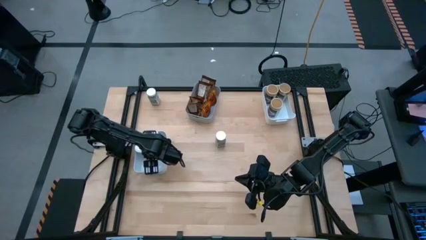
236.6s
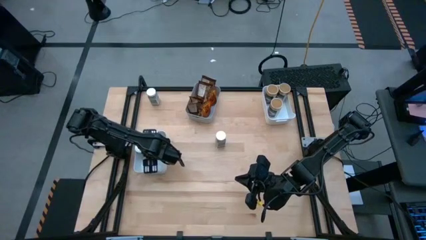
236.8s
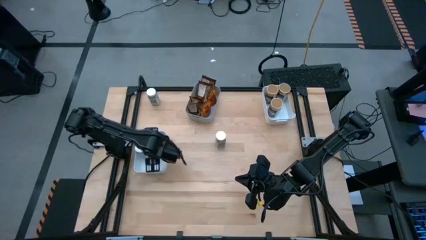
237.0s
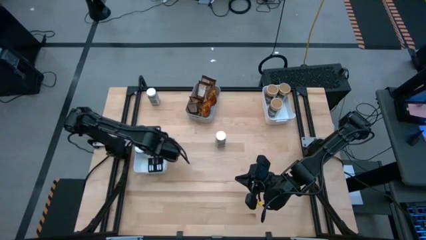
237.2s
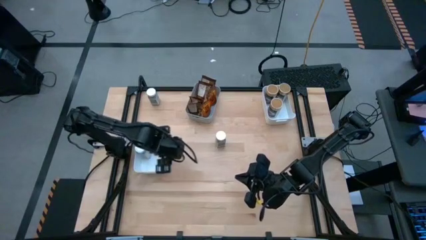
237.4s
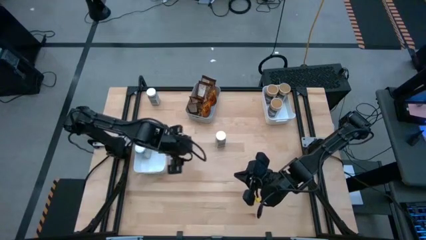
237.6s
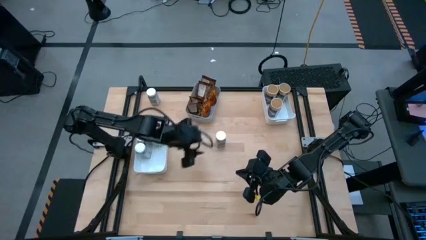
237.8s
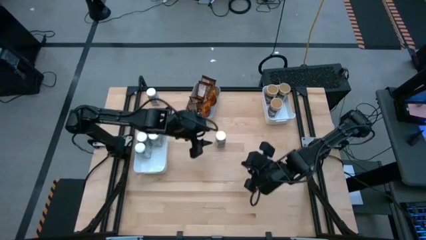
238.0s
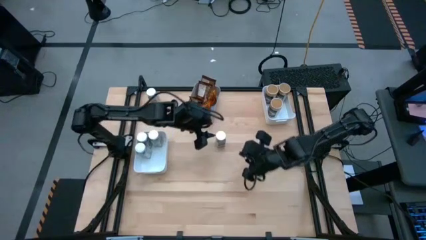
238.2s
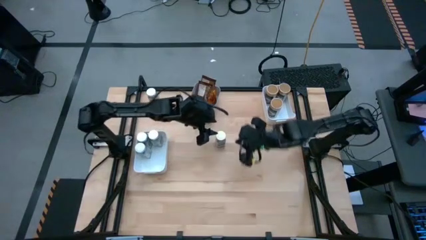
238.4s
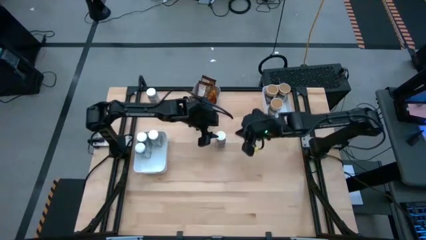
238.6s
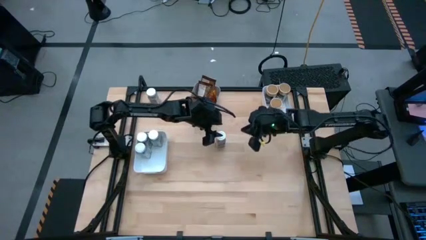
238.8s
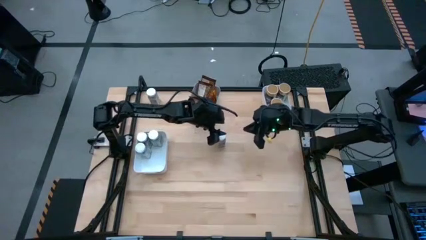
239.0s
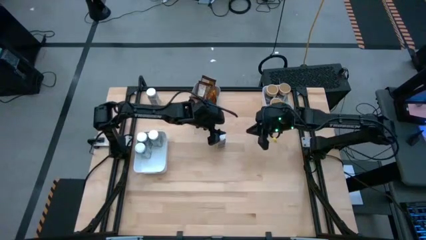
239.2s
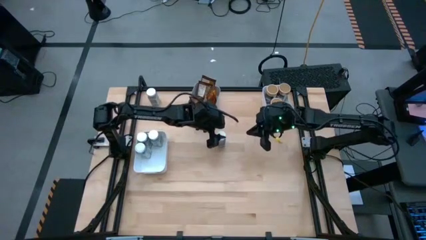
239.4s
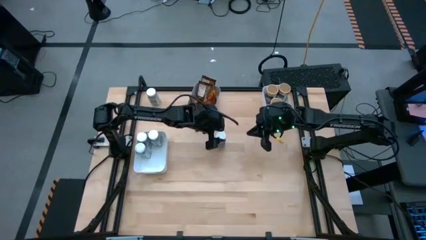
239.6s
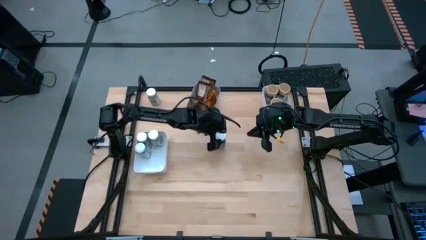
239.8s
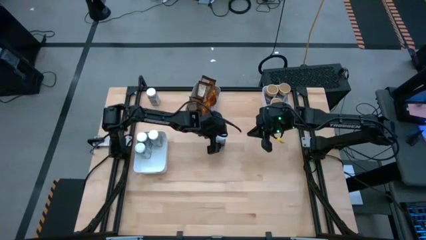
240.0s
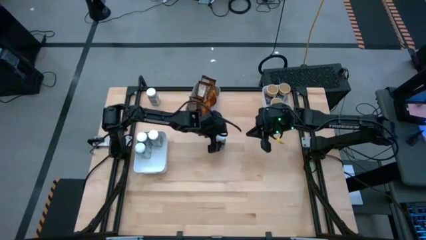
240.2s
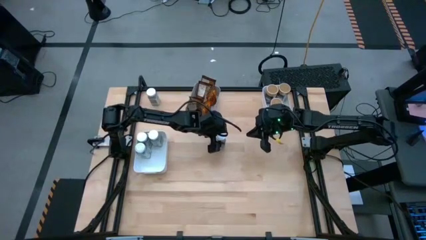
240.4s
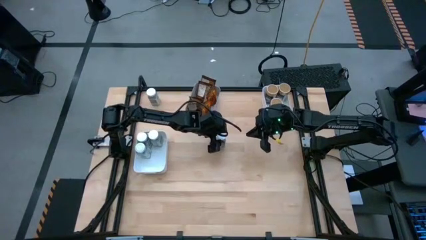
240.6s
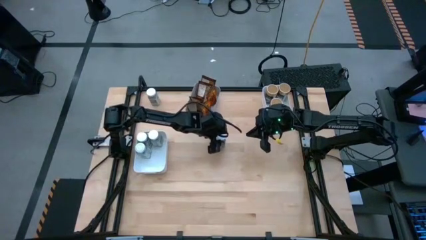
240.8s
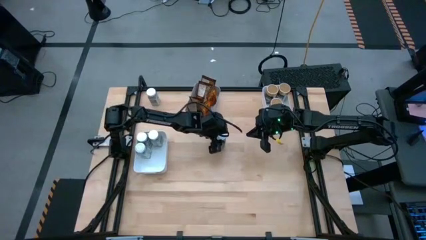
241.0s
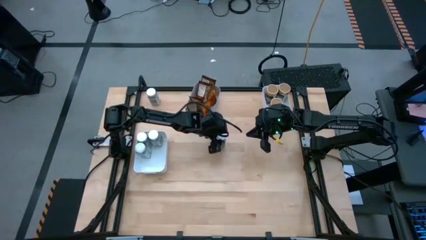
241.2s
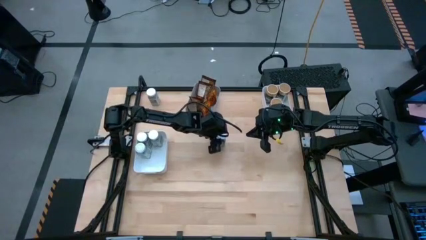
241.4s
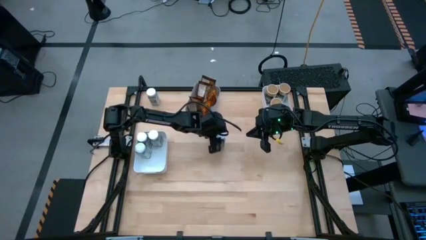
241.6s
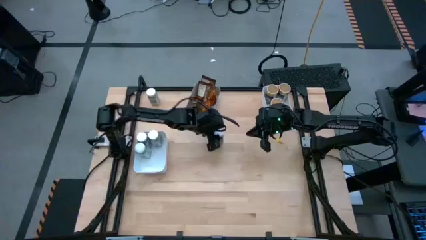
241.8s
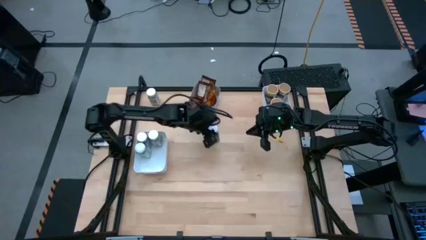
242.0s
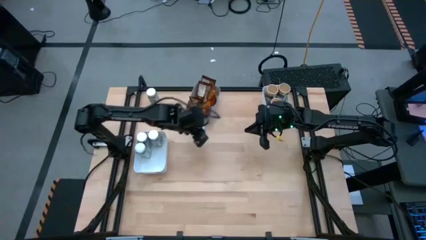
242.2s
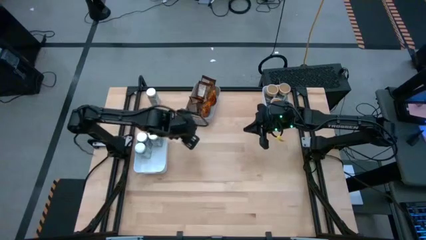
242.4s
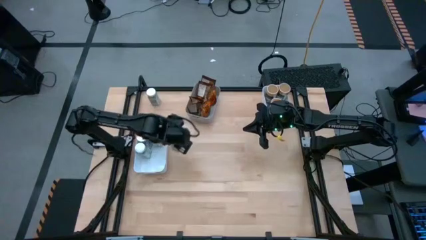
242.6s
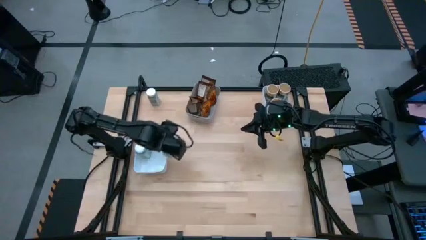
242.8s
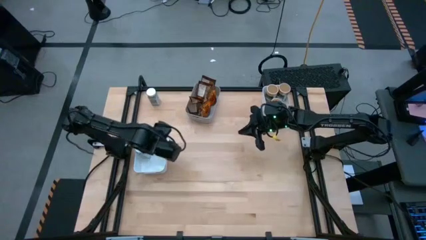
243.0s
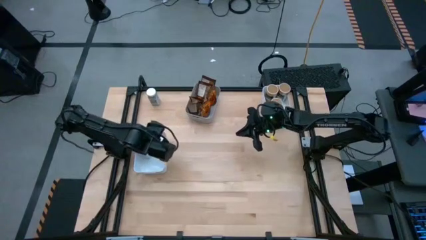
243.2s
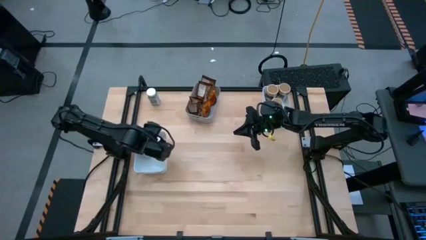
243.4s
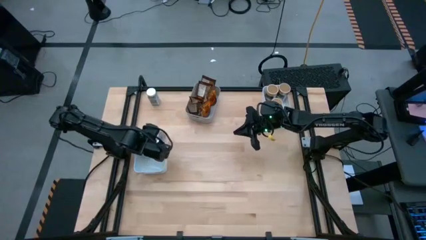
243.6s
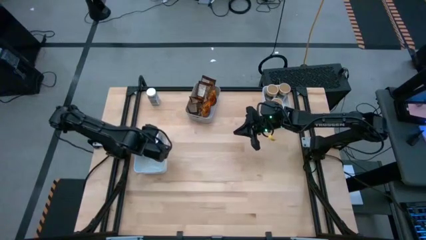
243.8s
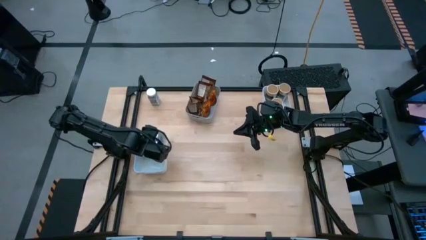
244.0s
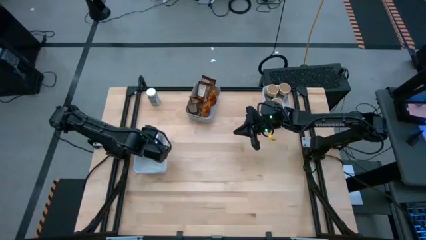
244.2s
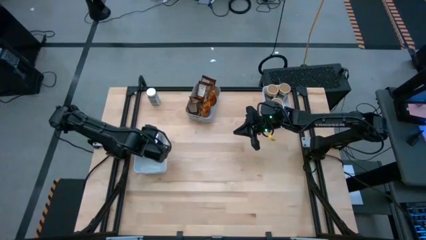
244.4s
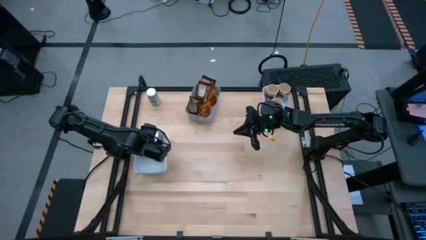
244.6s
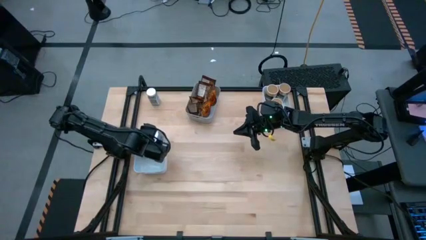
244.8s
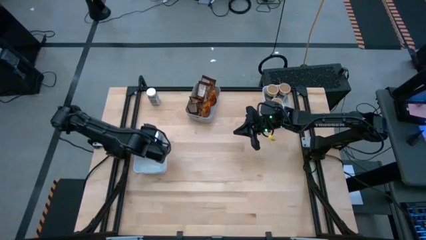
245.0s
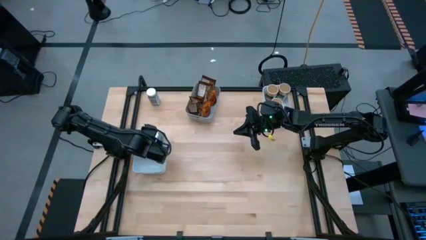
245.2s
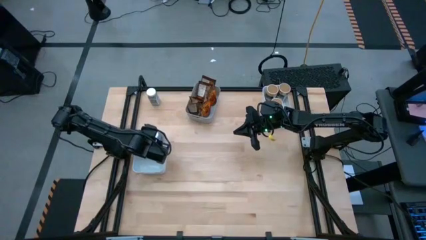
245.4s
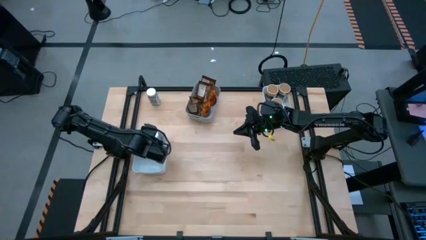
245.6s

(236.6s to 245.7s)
Task: Sort spices by type
Put the white spice bottle into the bottom white bin

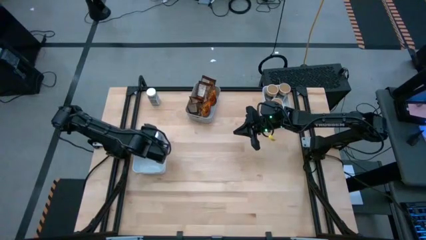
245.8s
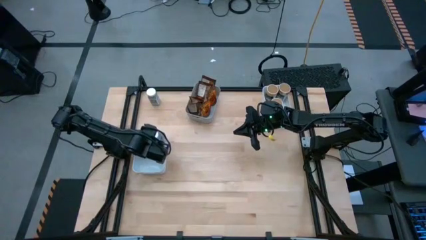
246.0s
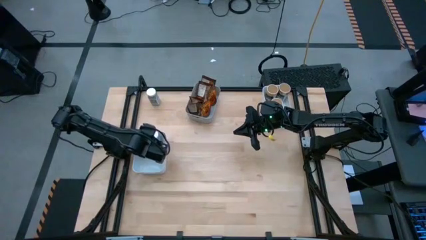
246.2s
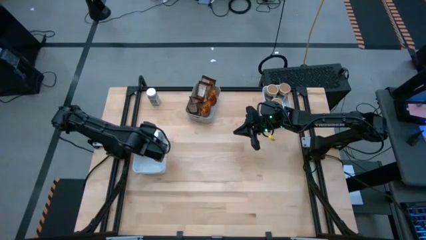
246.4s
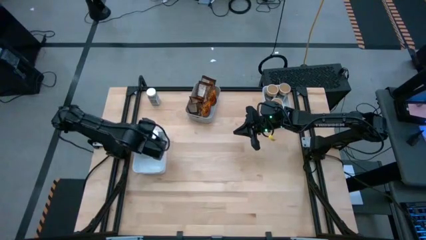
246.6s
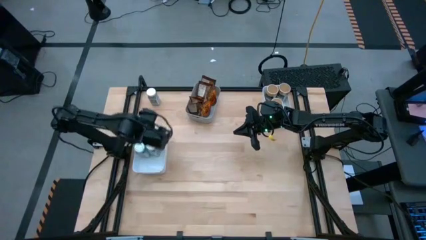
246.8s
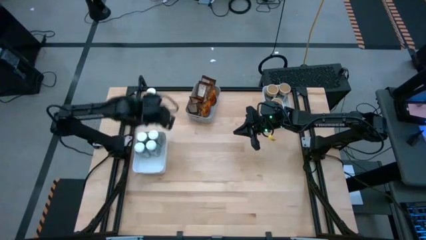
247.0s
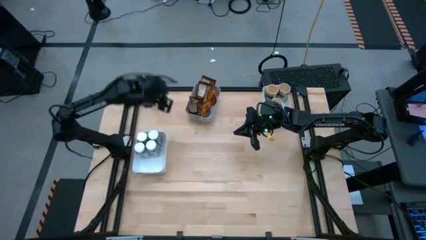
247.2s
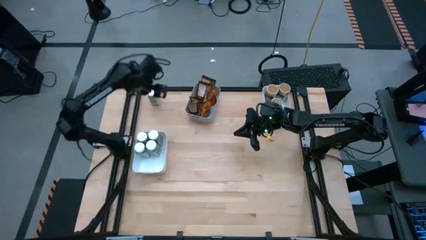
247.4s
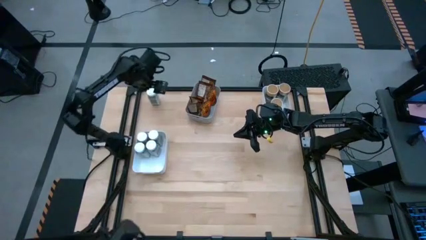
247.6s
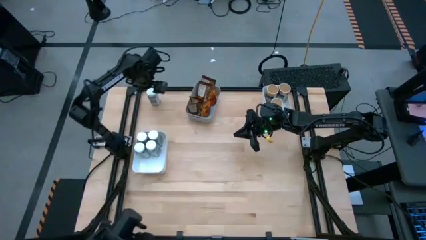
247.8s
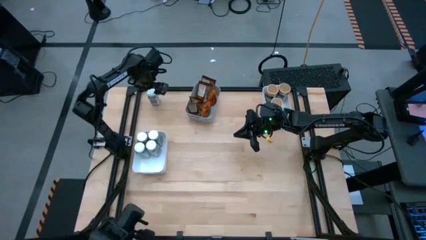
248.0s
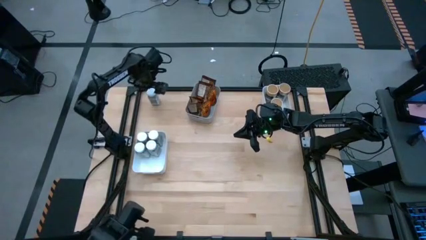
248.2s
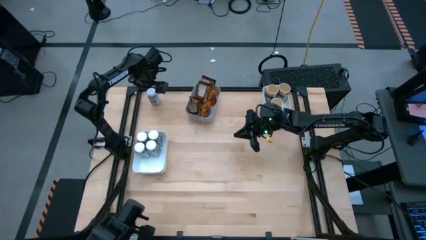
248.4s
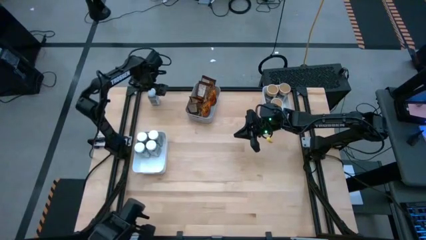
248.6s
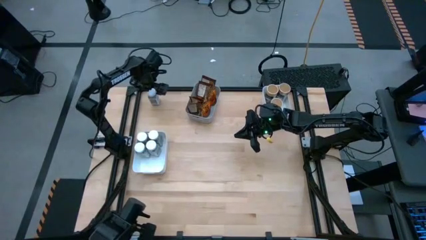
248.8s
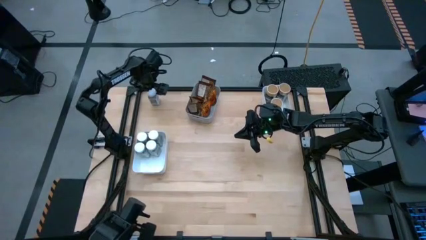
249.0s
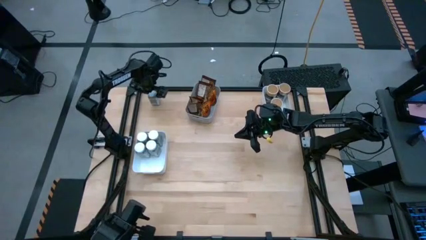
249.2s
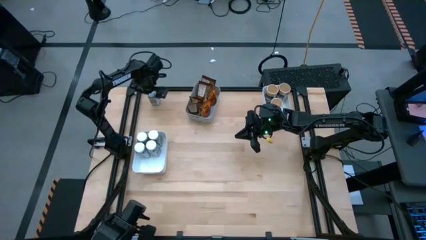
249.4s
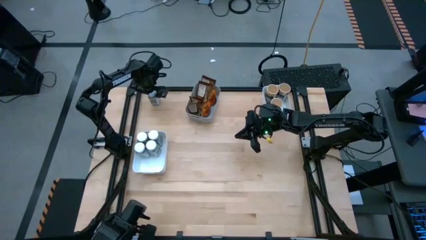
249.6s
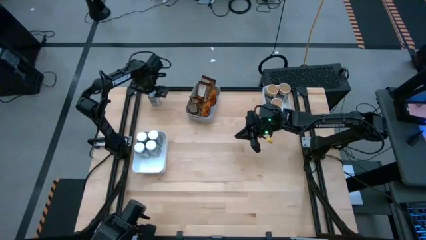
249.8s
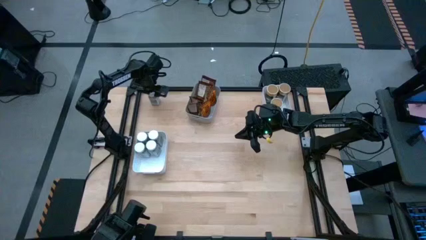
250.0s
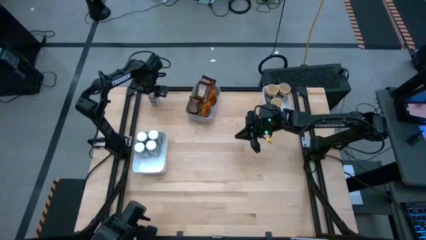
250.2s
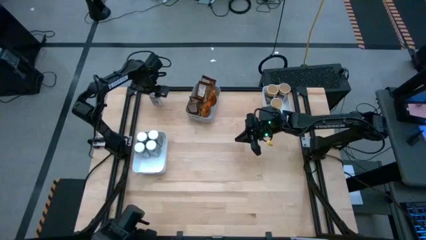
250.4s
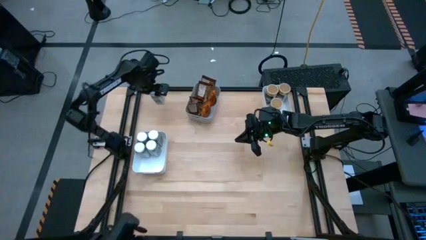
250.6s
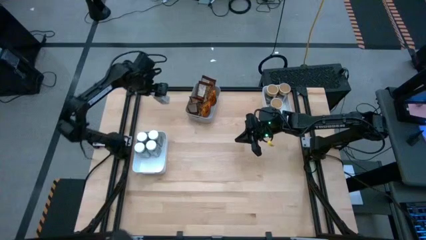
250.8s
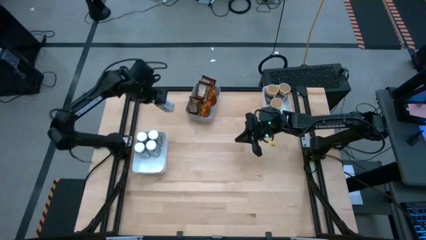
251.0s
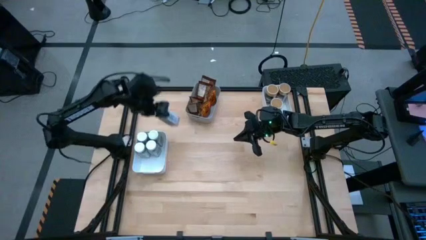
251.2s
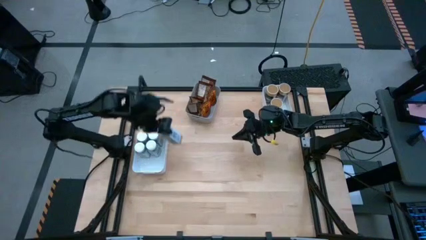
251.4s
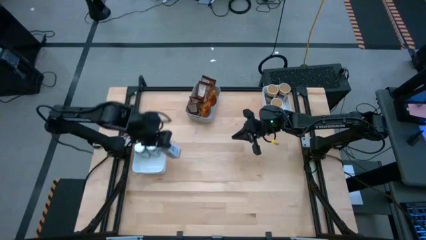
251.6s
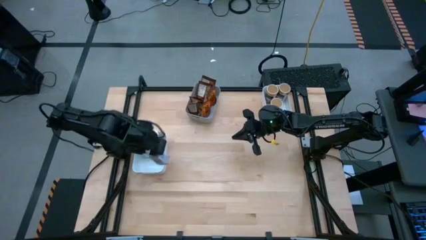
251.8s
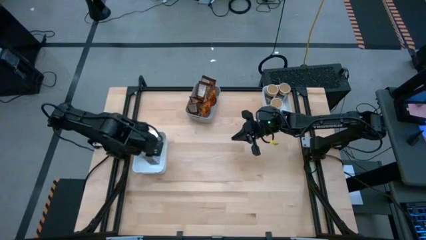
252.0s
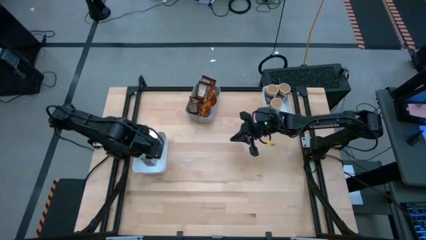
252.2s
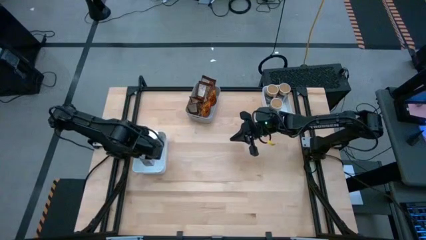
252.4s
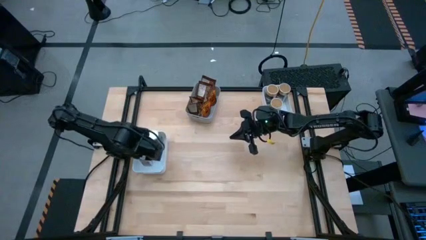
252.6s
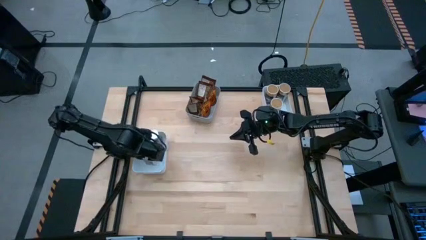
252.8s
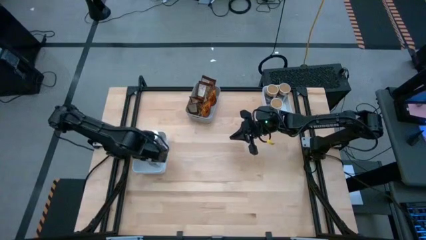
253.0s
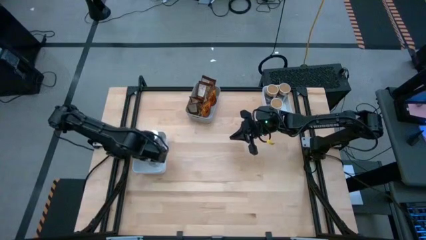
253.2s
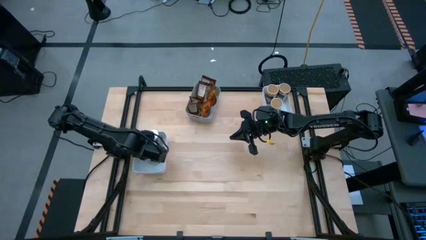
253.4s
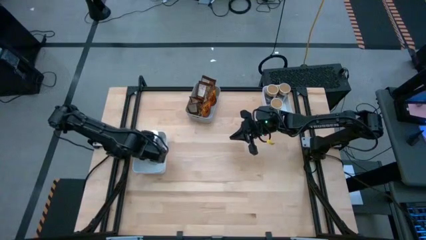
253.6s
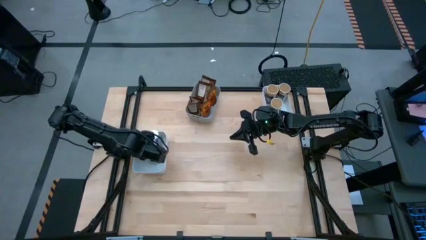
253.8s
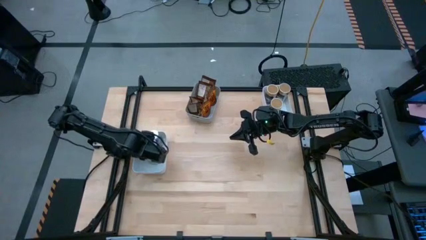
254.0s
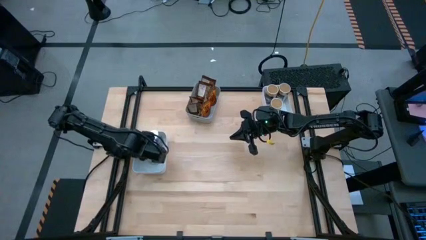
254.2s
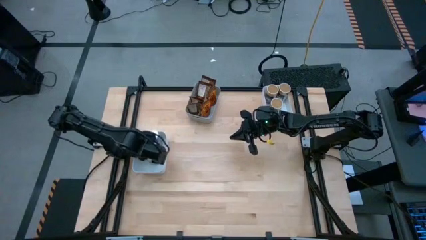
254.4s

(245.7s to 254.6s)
Put the white spice bottle into the bottom white bin
